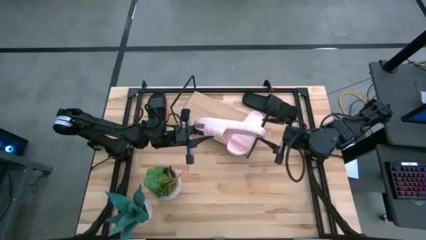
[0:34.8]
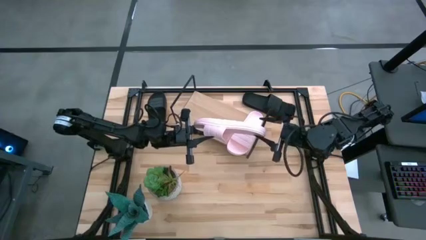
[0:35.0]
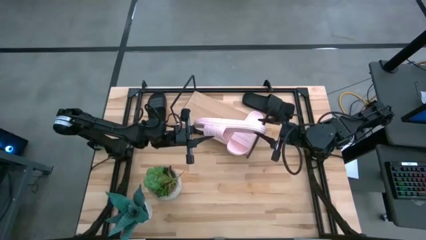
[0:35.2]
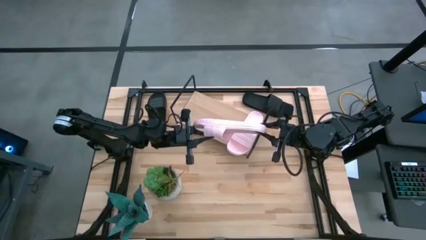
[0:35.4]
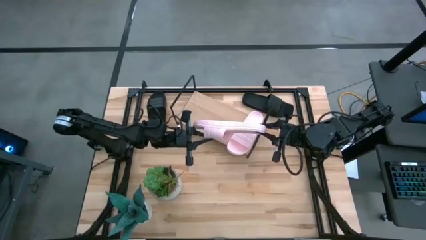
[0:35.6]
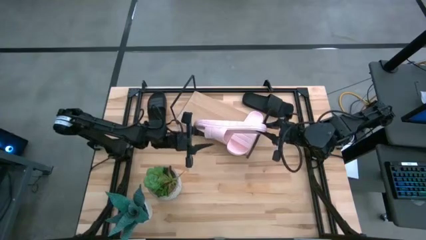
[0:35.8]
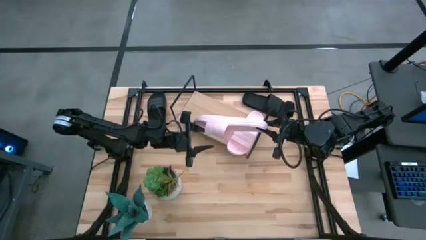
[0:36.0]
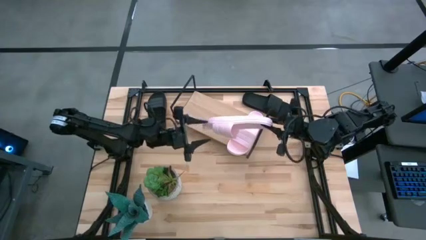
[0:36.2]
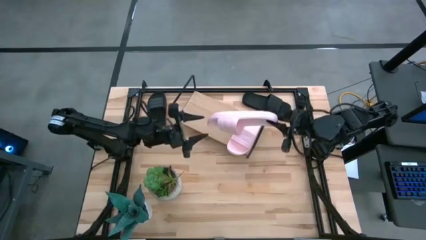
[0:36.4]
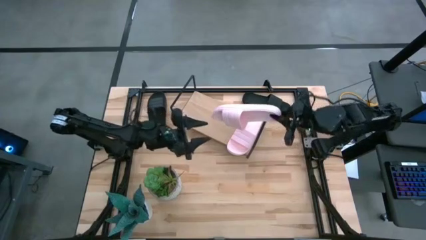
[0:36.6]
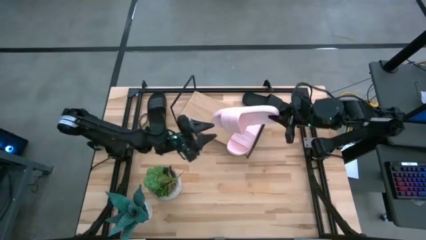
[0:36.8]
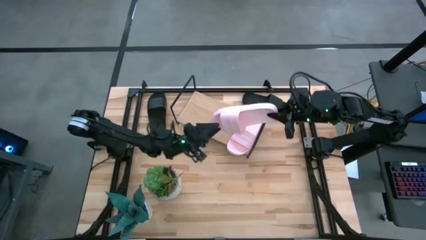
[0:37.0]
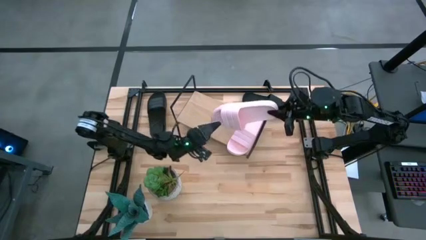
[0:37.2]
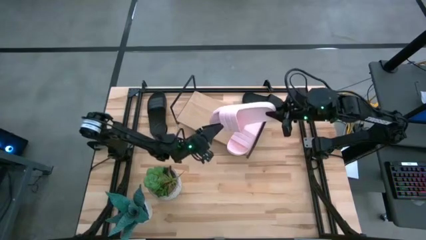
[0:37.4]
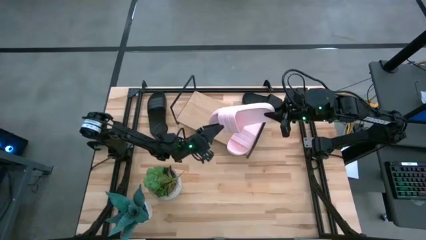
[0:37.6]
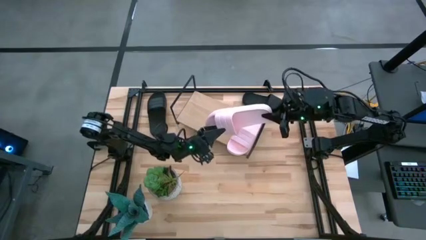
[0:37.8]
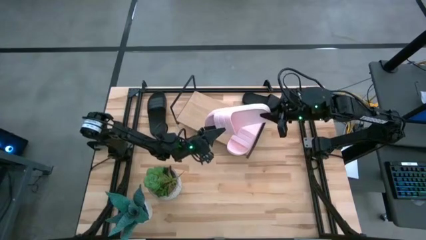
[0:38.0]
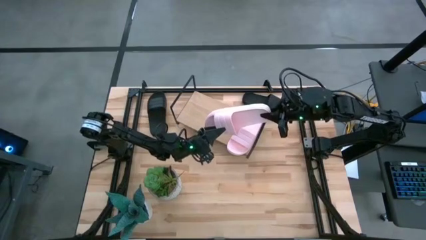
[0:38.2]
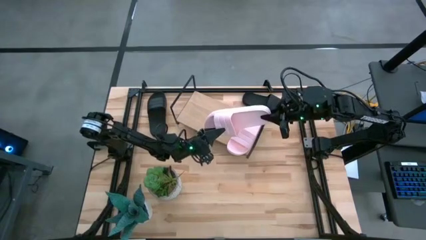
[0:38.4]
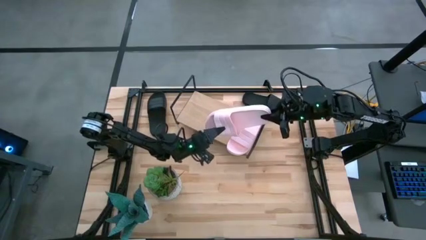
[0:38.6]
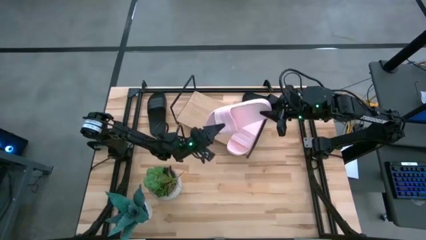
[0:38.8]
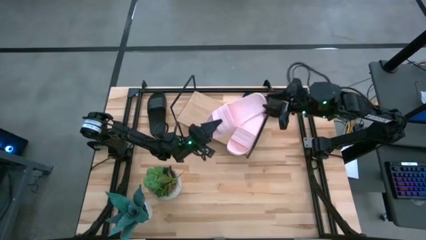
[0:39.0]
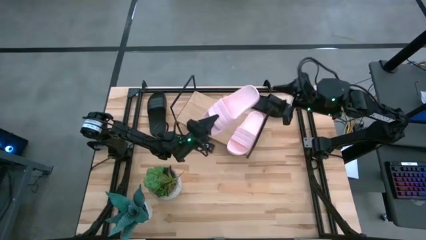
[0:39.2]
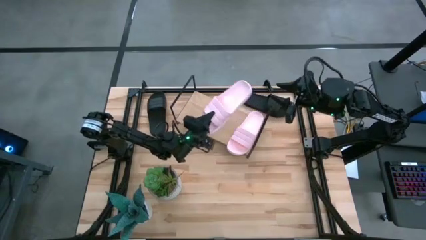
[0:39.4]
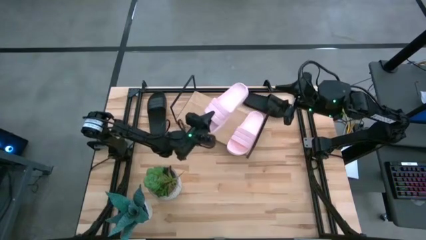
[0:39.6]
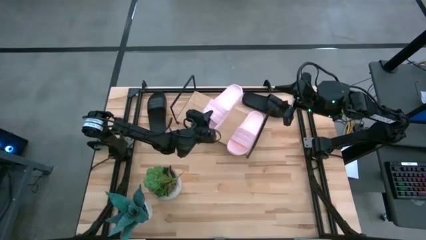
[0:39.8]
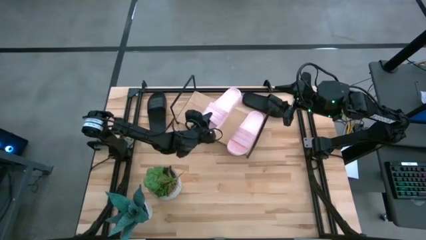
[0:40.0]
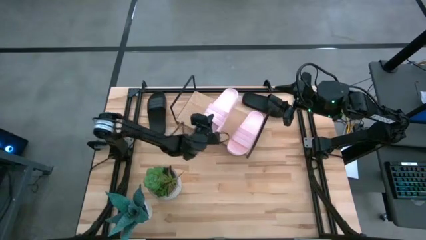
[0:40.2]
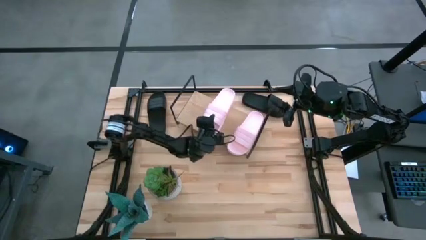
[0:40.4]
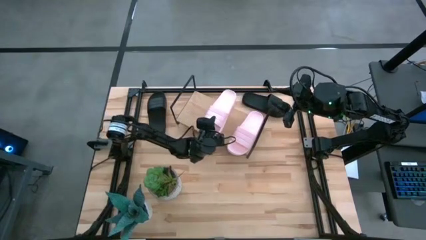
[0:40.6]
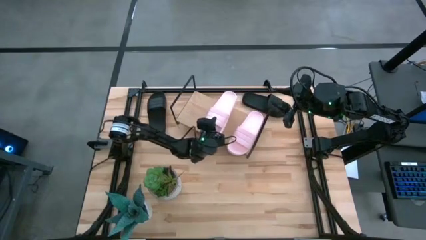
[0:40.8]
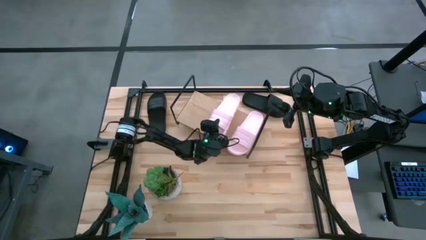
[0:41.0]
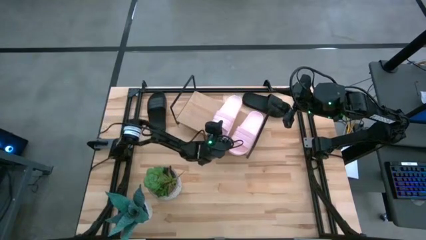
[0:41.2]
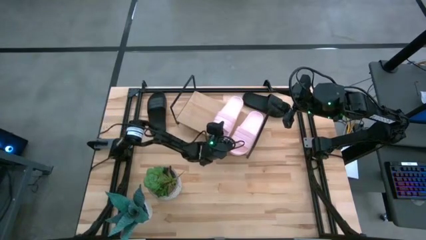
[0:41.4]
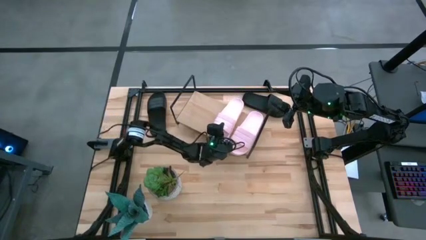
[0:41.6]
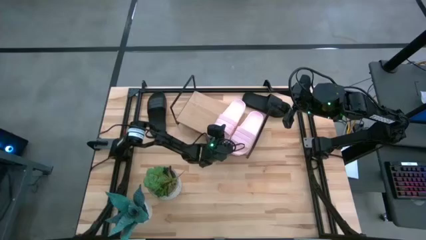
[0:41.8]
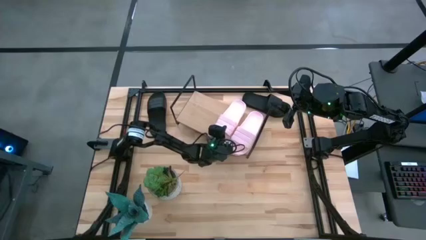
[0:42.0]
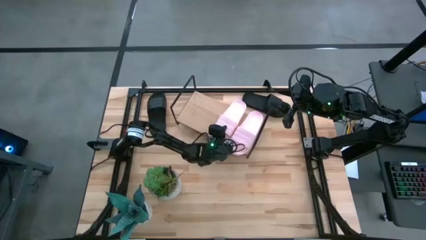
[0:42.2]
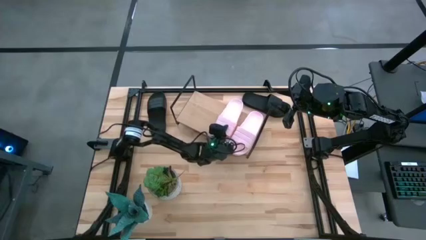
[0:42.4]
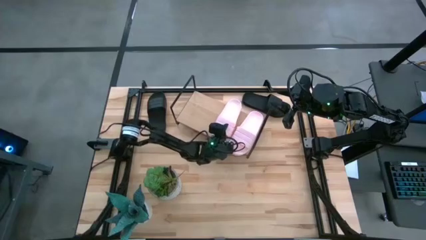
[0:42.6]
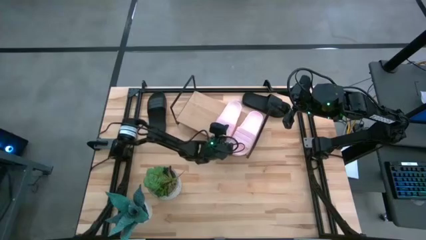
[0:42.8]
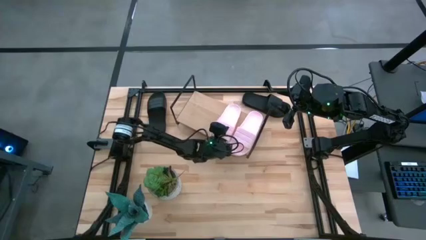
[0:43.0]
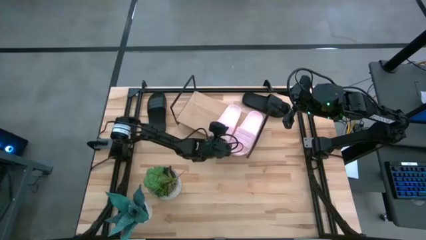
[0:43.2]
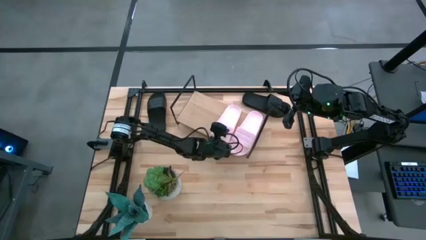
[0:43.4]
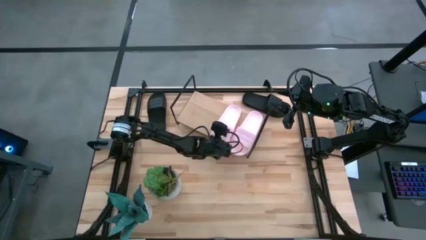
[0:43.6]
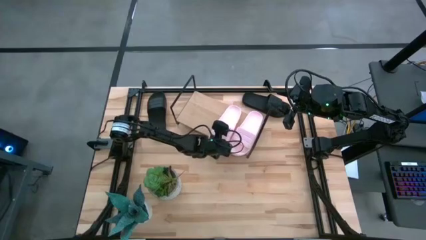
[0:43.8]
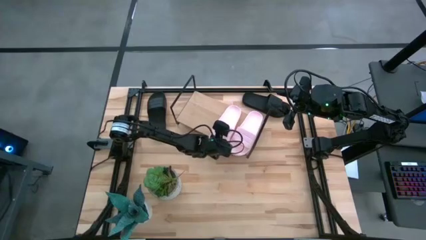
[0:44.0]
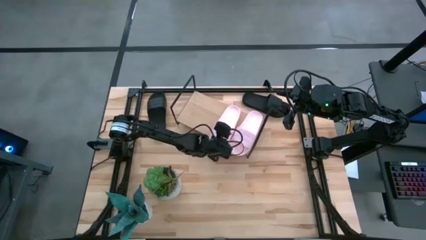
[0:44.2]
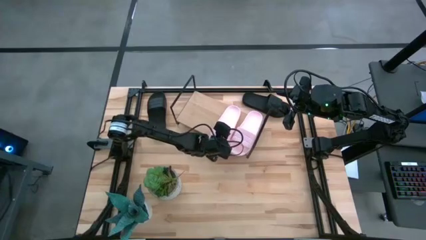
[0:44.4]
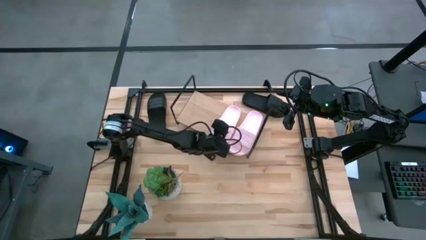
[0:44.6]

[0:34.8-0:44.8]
Task: Pick and place slides into the shelf
Put the pink slide on the shelf

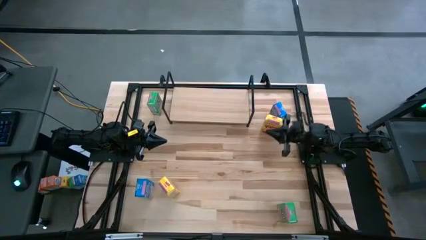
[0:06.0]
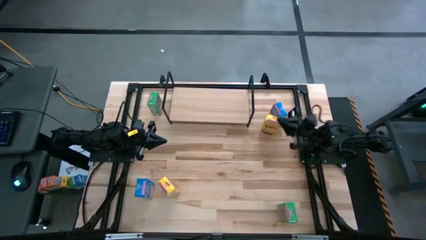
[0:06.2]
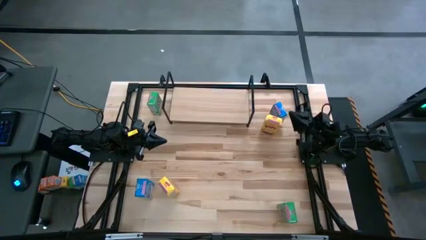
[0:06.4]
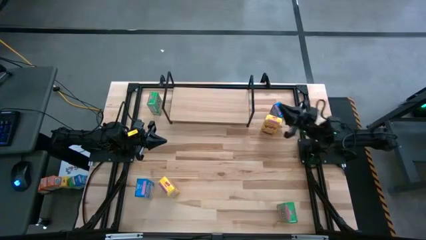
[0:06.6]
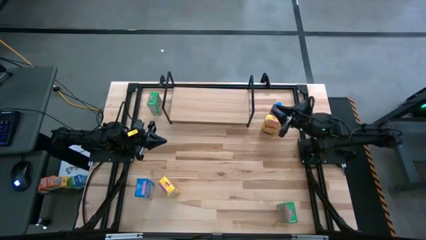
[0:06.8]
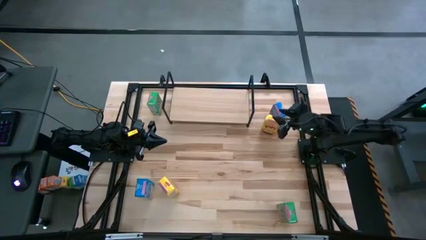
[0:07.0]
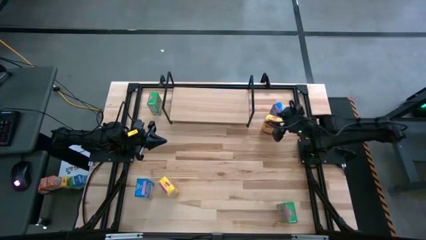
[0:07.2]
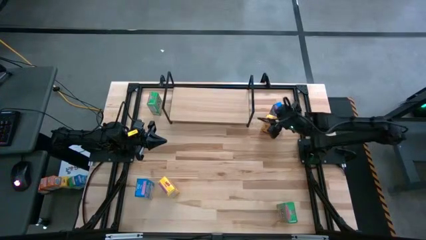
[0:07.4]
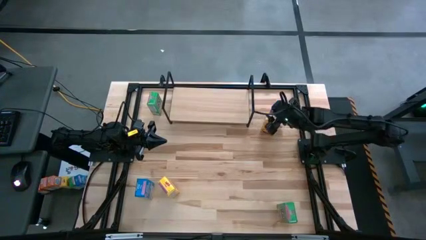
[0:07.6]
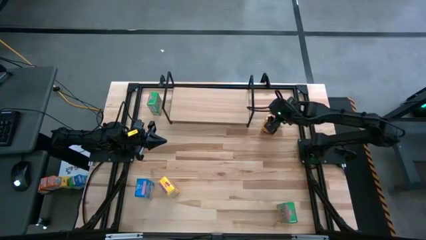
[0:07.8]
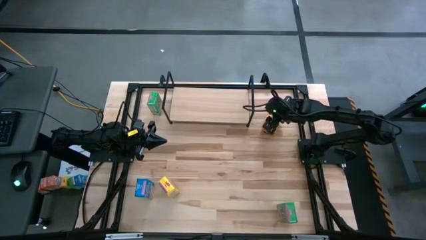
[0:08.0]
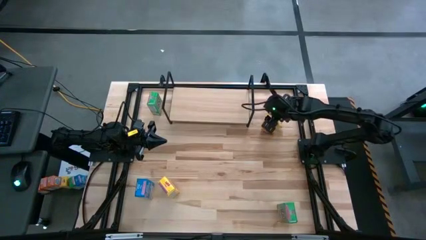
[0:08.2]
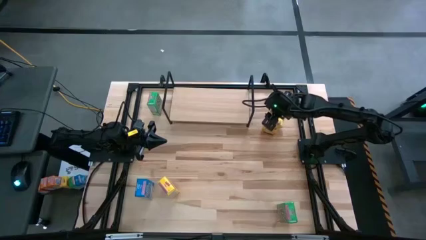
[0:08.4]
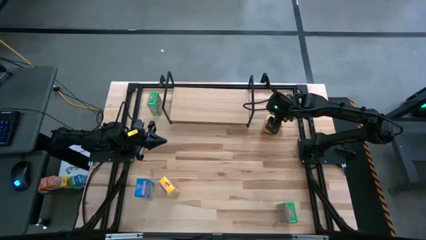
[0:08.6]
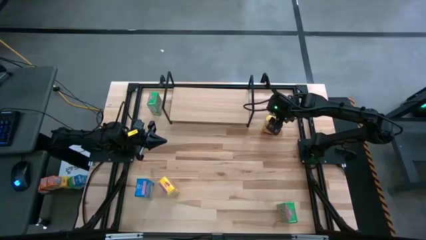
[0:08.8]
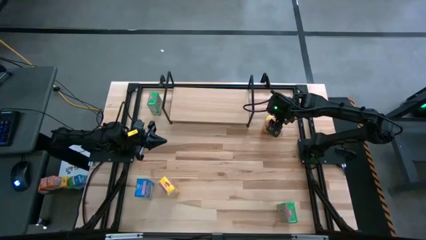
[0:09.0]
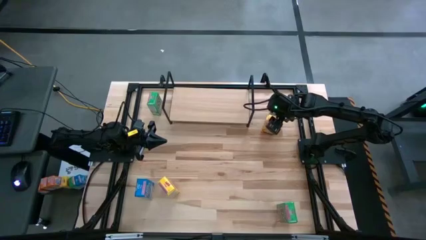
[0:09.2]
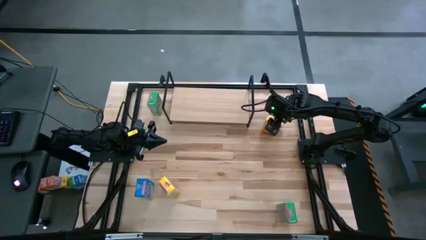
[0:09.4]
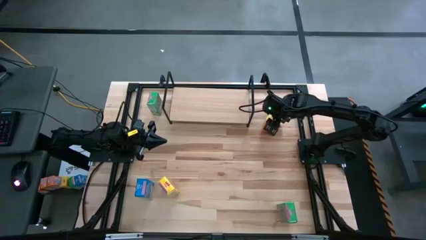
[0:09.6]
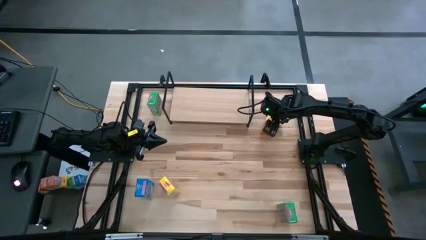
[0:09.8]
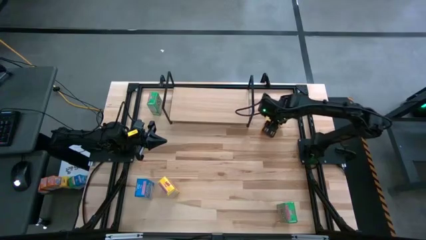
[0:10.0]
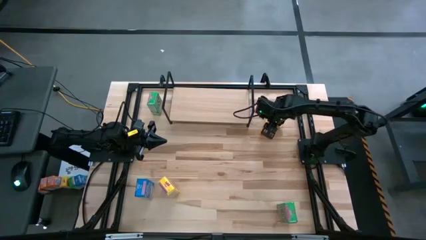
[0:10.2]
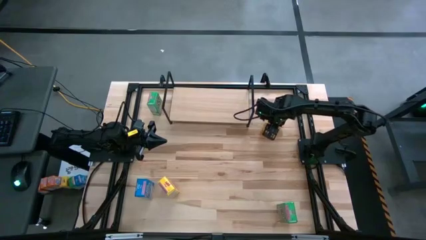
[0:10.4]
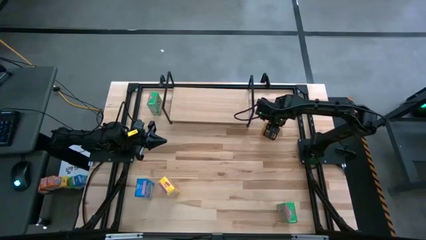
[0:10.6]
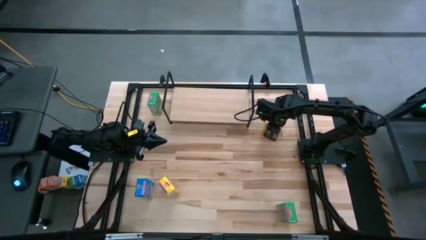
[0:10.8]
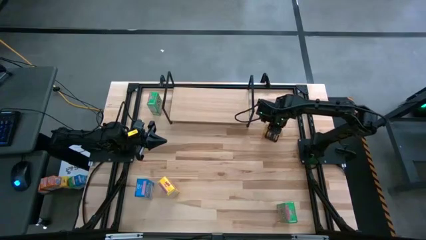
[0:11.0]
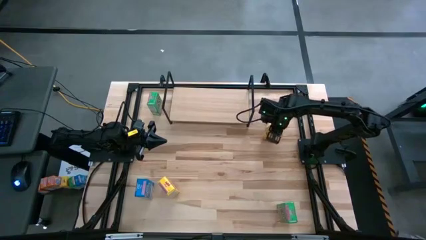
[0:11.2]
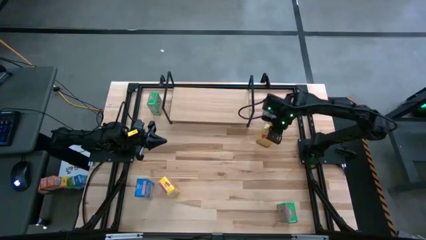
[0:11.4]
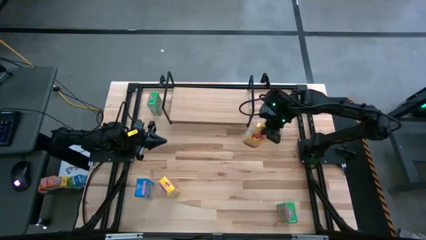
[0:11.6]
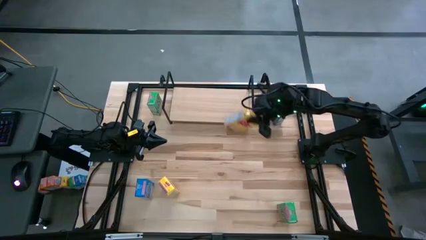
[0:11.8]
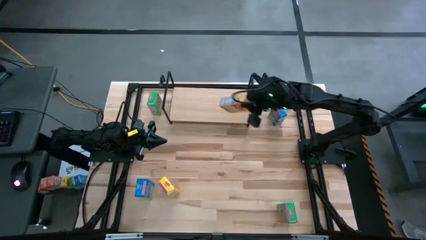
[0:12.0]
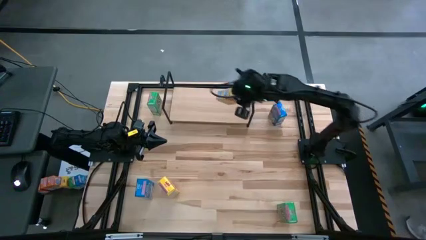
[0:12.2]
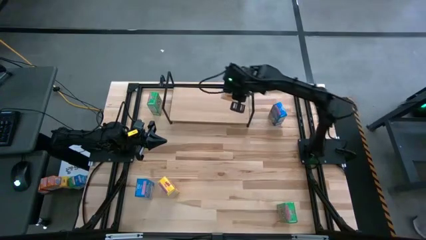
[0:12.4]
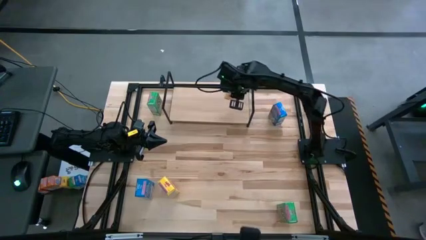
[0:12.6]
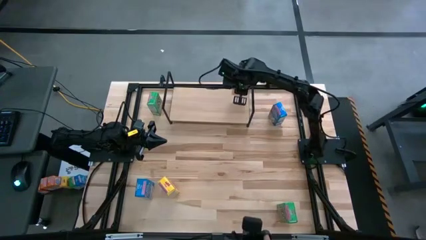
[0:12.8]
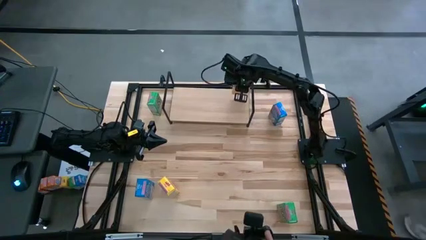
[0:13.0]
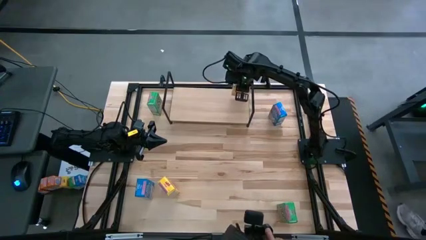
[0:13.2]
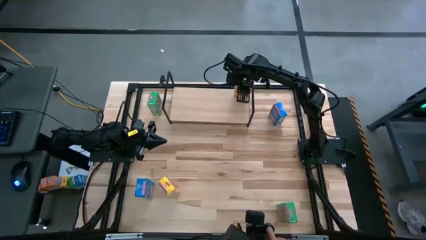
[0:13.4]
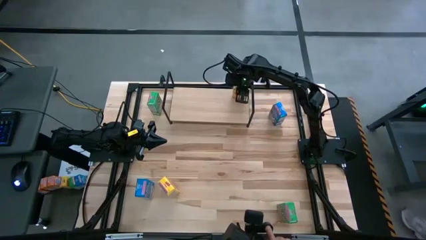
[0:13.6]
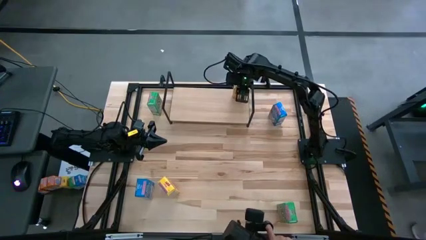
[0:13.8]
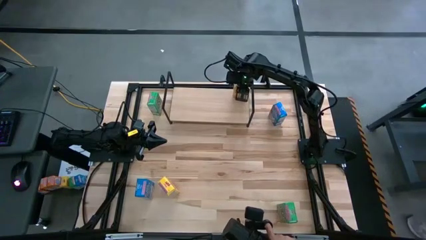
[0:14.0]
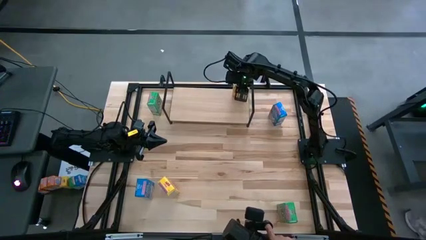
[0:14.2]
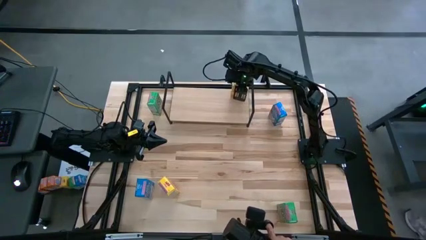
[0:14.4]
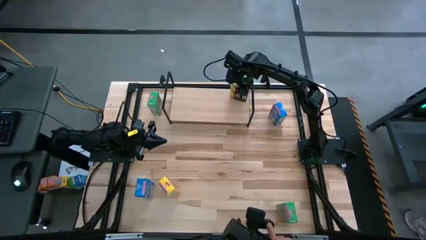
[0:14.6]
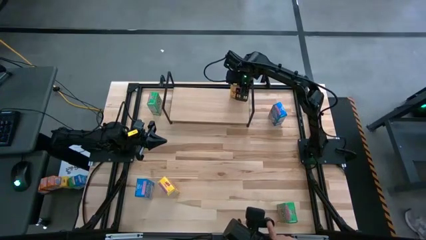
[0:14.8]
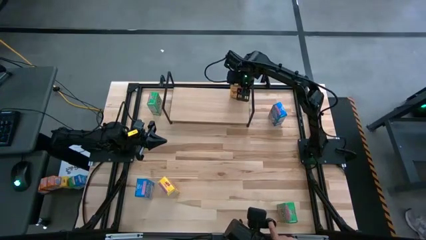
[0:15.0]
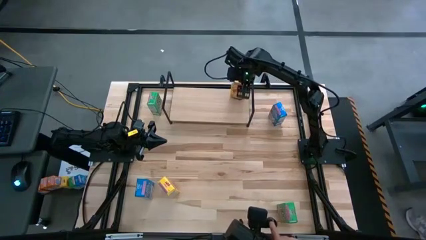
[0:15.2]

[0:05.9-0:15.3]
Task: Stack cereal on shelf
Put the top yellow cereal box on the shelf
